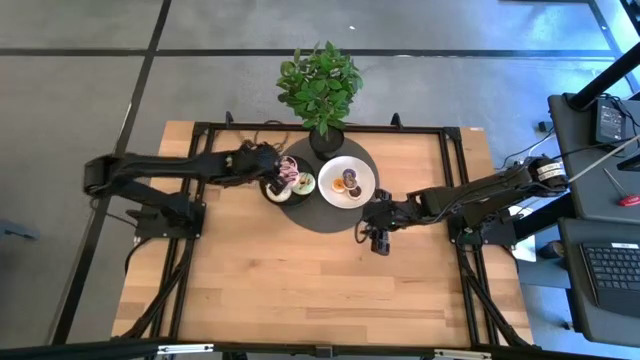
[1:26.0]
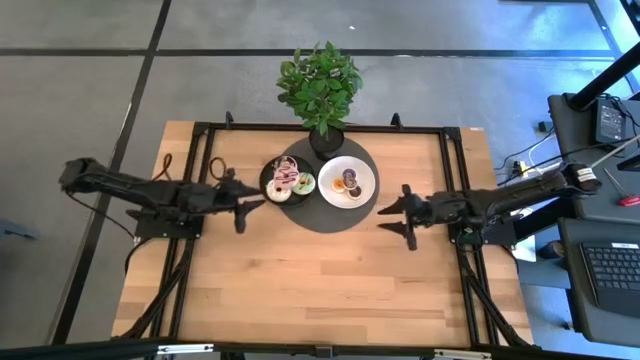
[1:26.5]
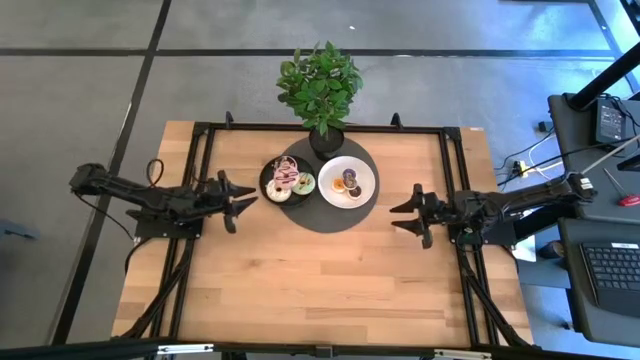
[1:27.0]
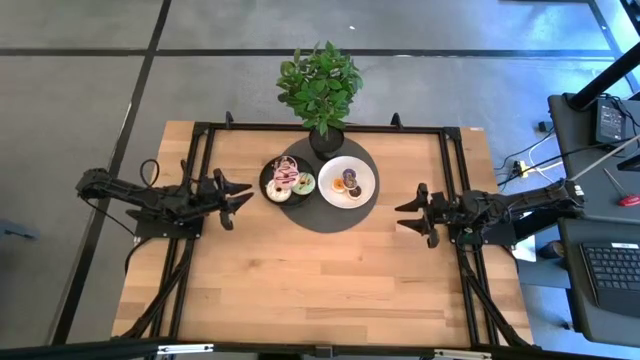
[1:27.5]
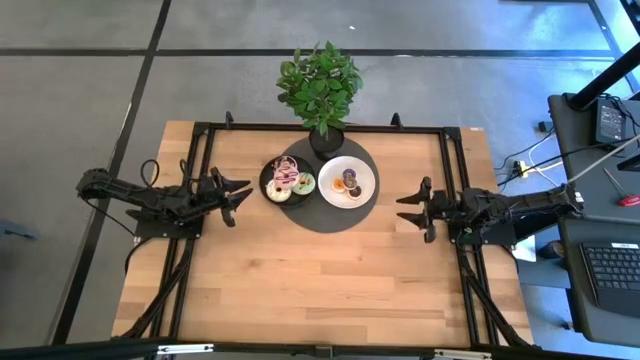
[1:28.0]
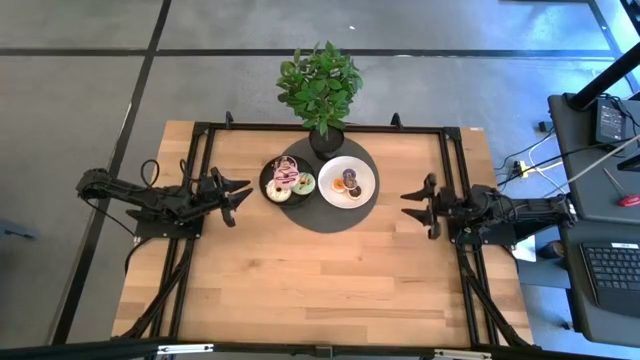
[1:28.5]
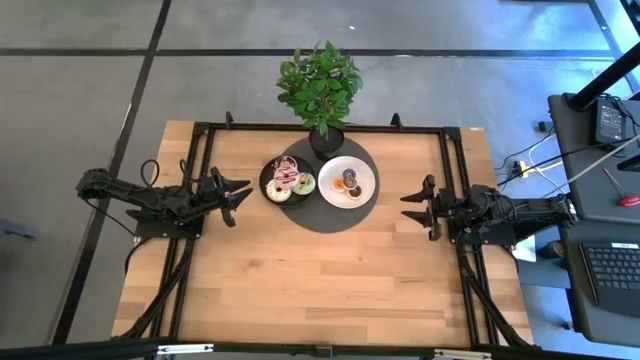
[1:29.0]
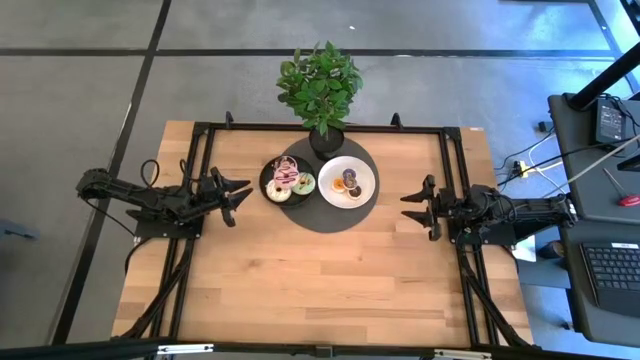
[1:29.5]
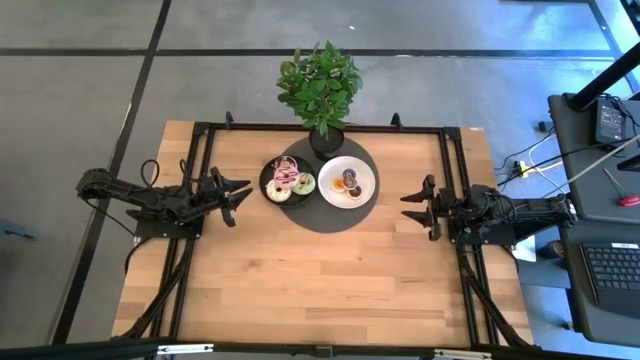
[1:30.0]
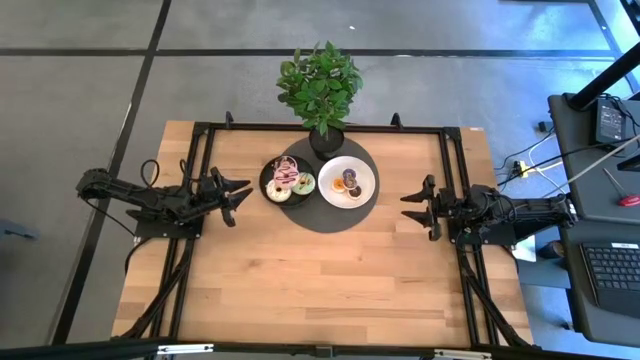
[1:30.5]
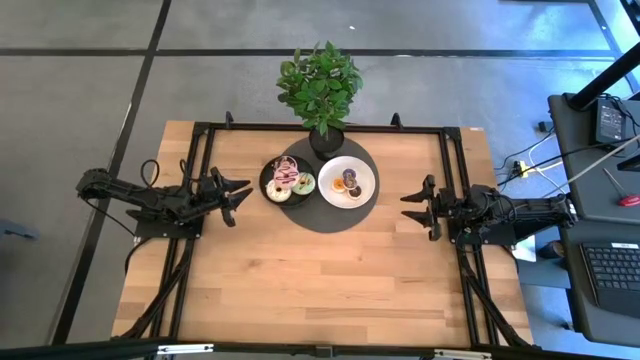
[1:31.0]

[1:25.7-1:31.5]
Task: Pick & Place donuts
Return to Home Position

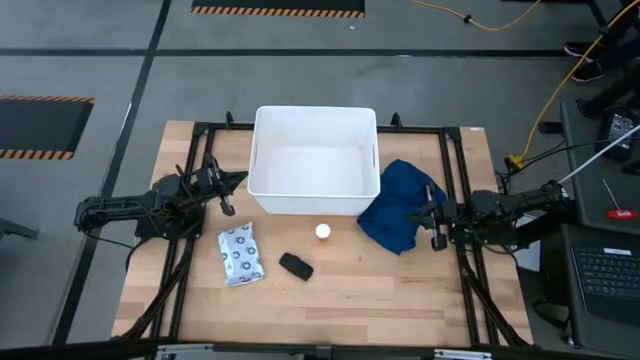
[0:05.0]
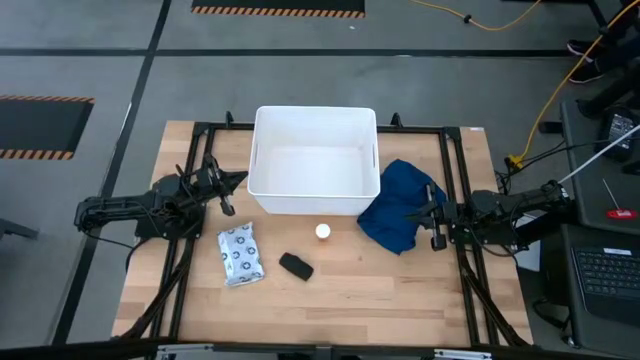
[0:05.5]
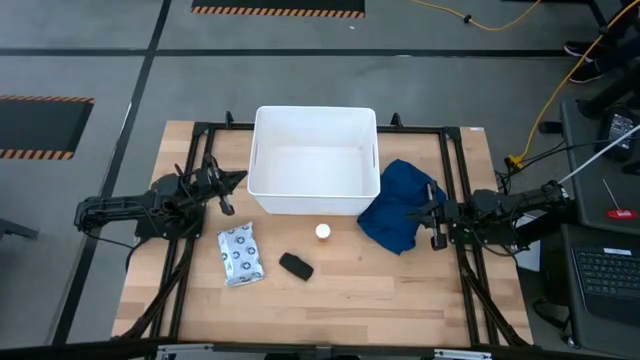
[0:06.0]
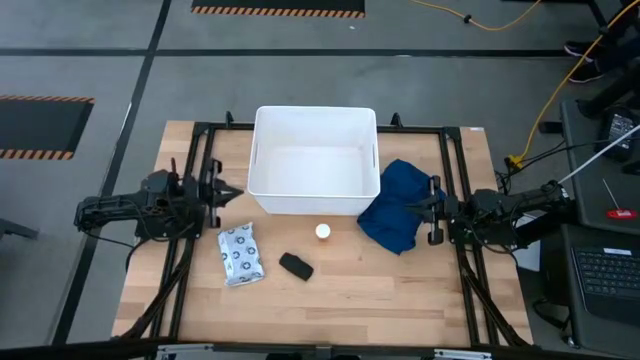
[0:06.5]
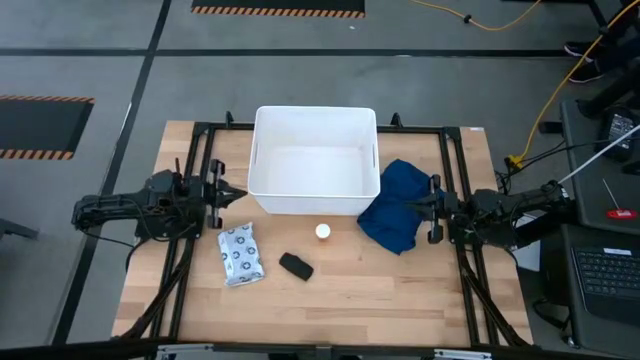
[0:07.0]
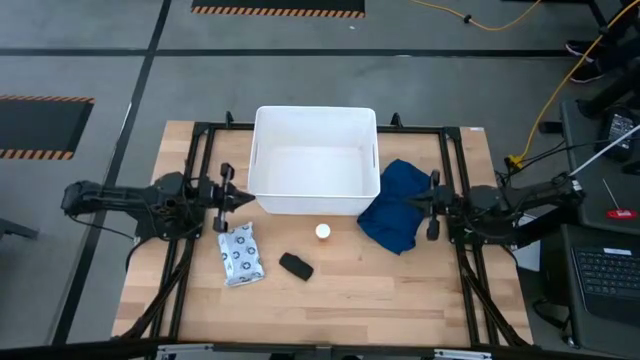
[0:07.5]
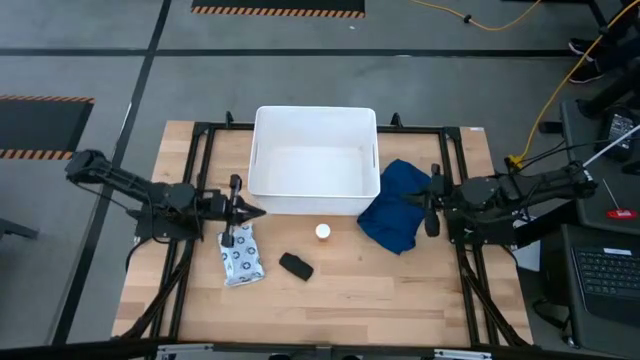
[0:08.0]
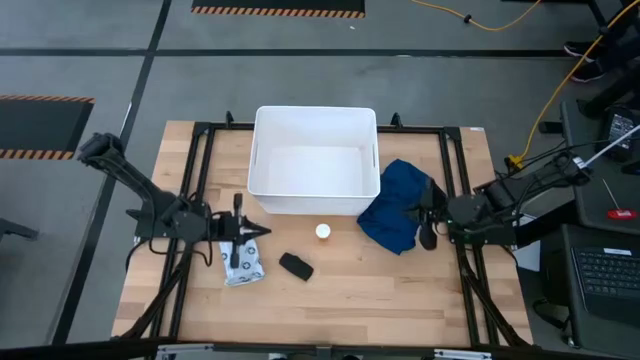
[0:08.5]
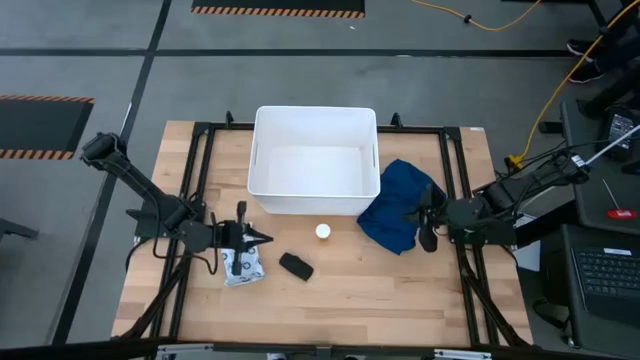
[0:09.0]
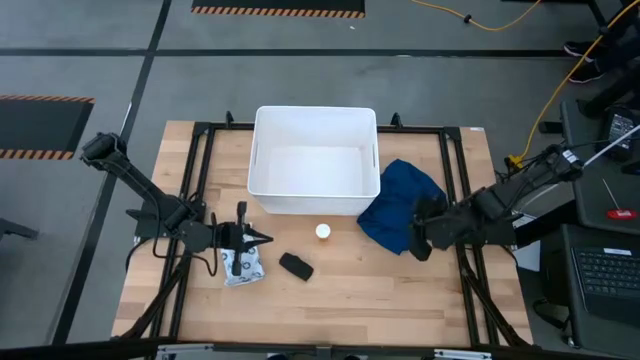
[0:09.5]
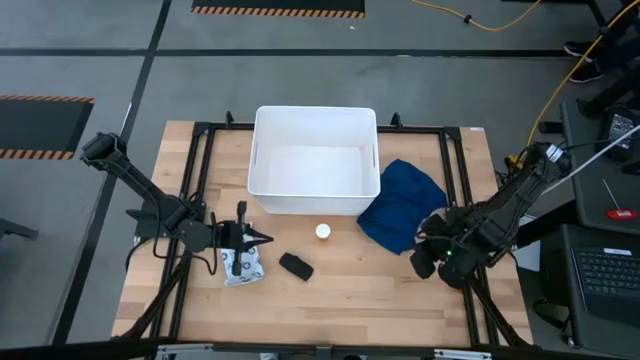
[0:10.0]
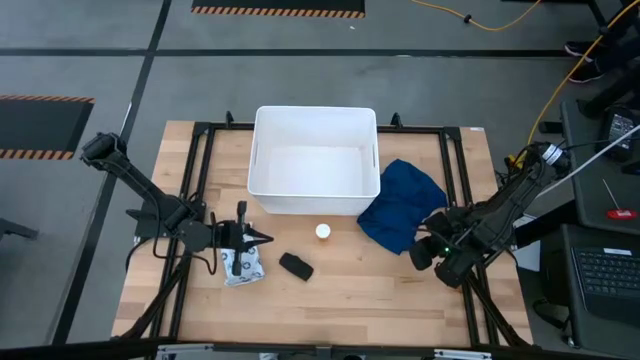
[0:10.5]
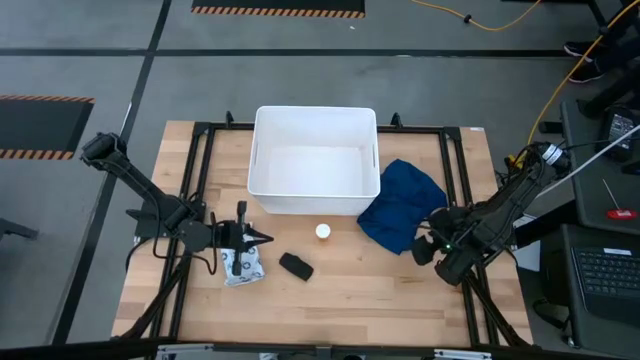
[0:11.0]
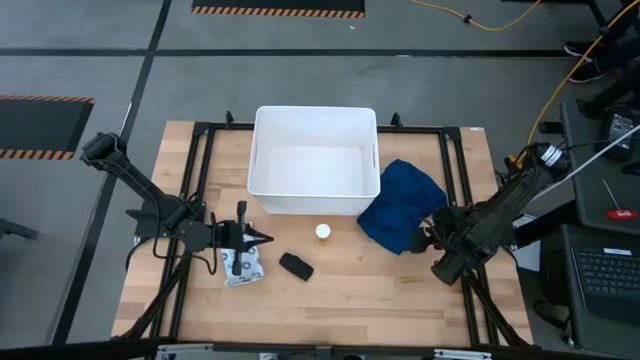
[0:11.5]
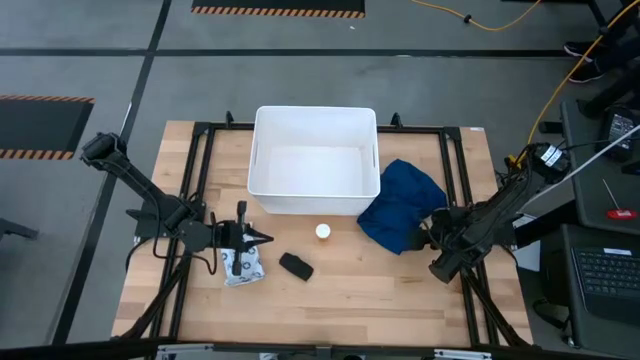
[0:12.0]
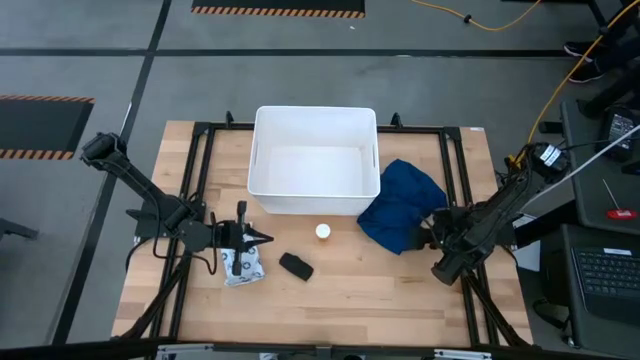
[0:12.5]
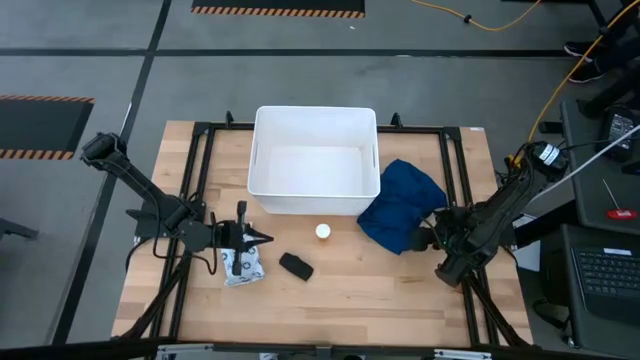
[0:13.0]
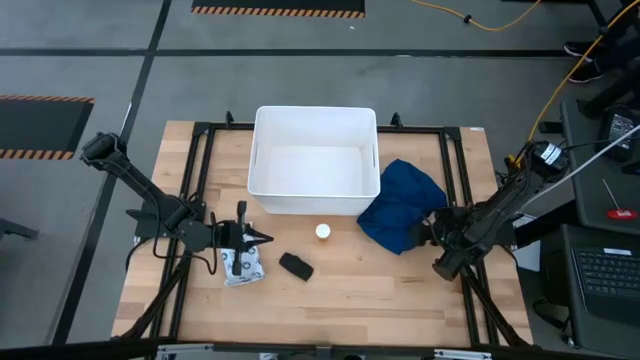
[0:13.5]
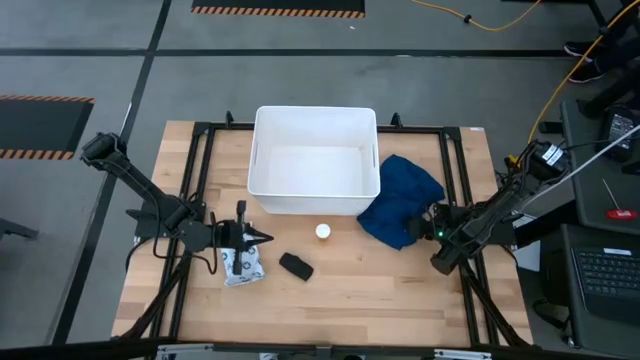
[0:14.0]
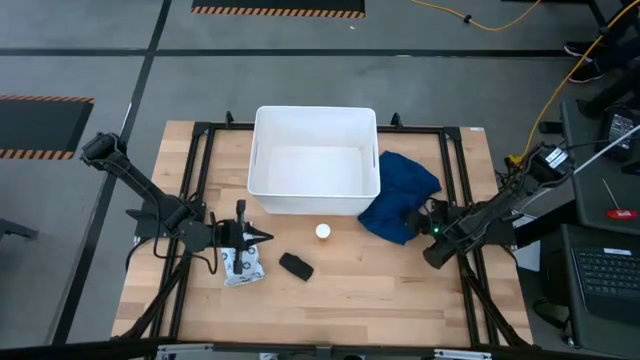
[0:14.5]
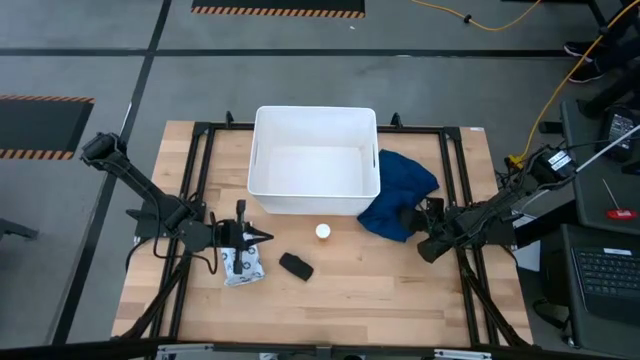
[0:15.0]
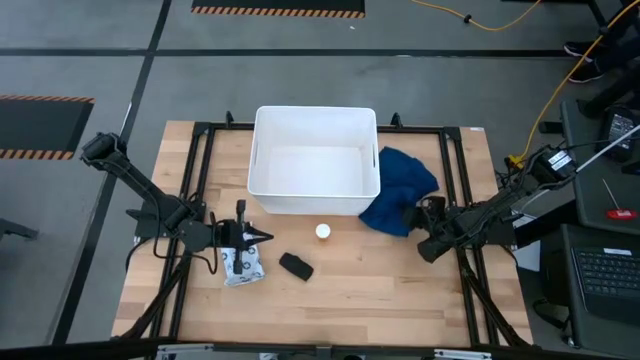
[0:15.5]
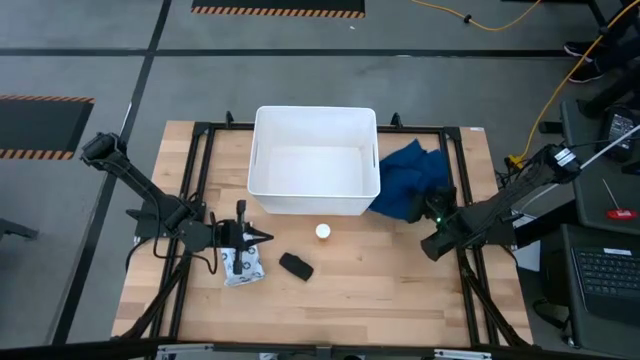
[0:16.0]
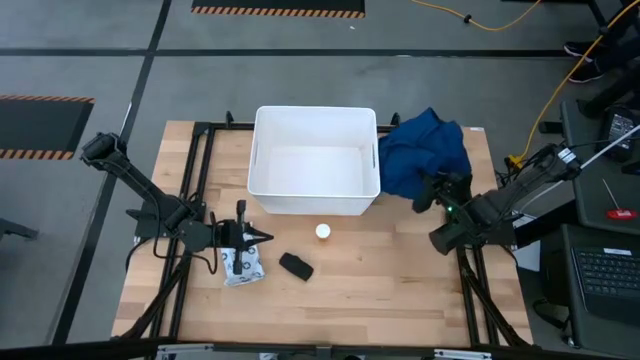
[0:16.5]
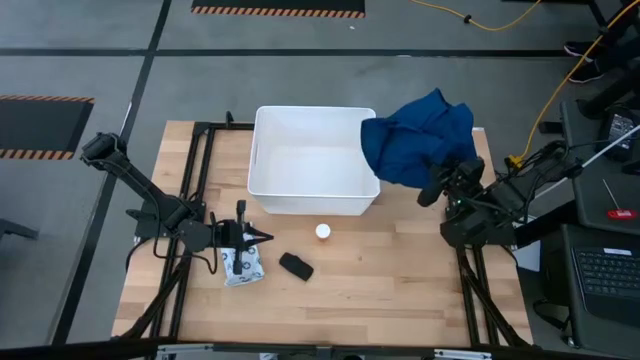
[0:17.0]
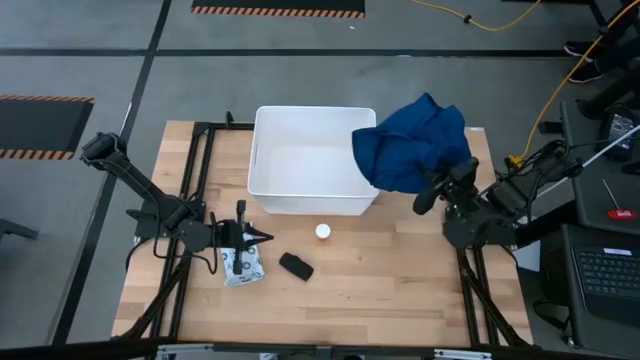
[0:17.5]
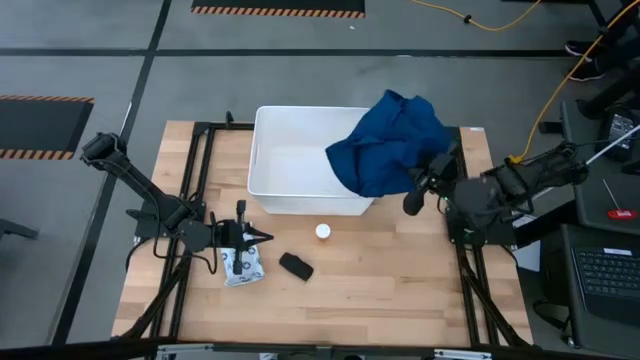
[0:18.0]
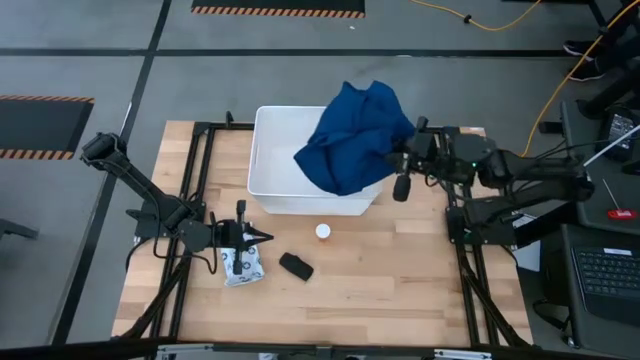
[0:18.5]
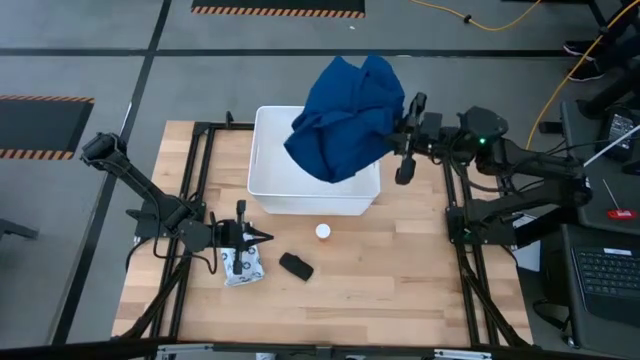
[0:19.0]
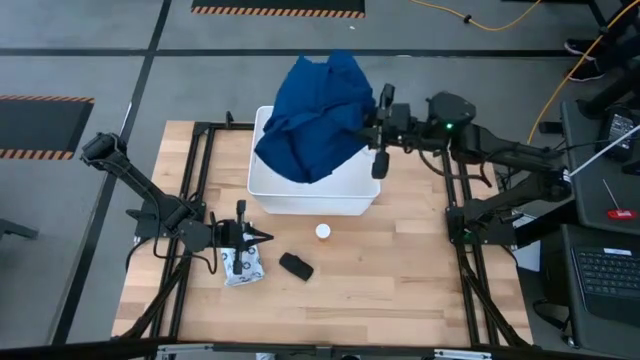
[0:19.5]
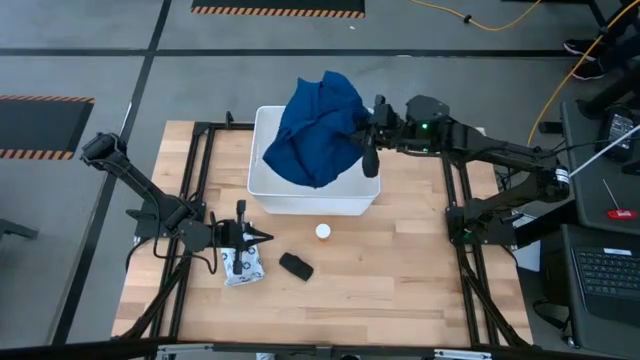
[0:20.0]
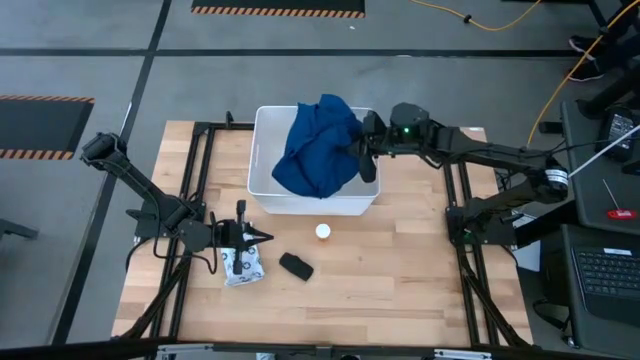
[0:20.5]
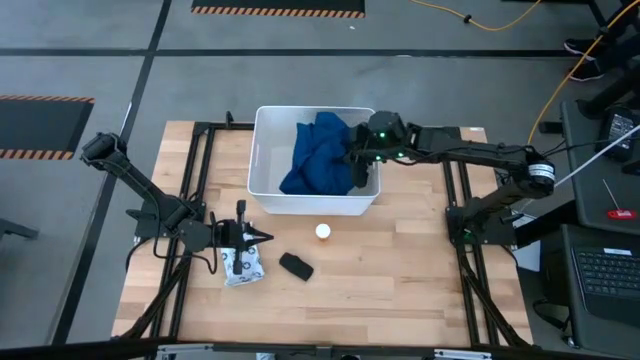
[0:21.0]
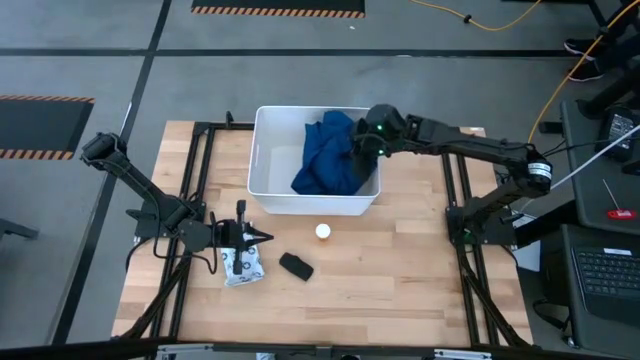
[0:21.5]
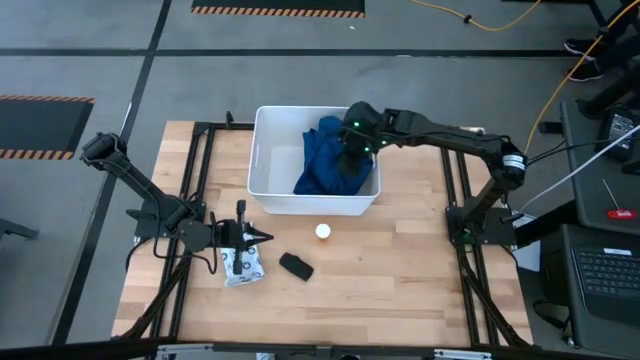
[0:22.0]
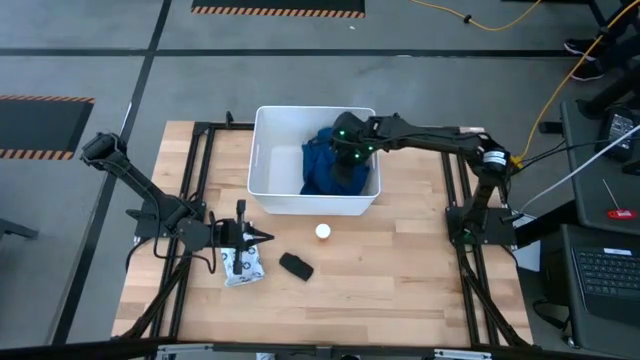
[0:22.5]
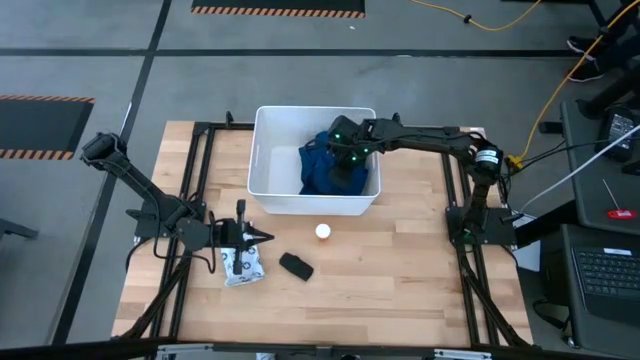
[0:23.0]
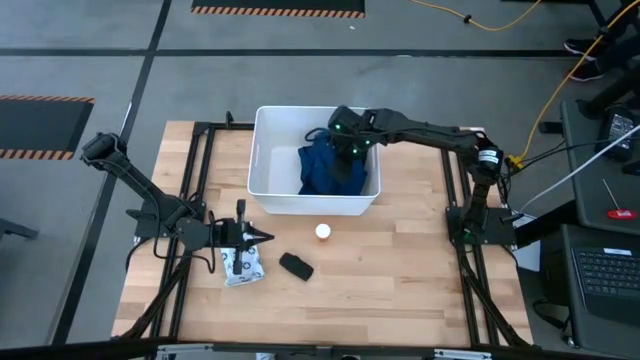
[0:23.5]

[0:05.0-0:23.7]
Task: Pick & place medical supplies in basket/bin
Put the blue gown into the white bin
